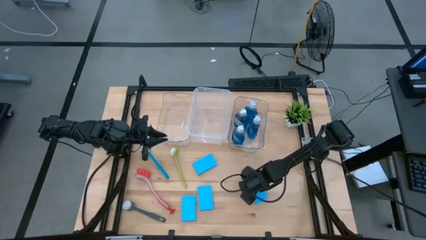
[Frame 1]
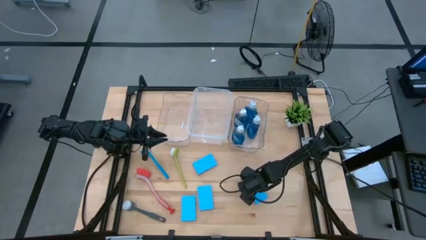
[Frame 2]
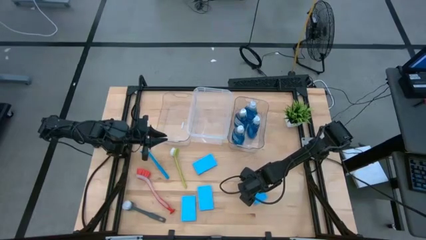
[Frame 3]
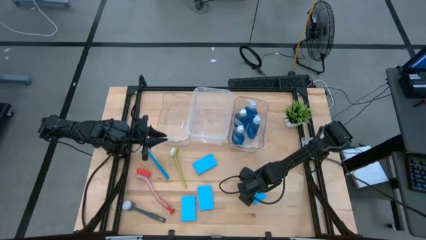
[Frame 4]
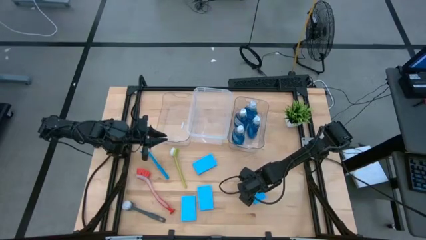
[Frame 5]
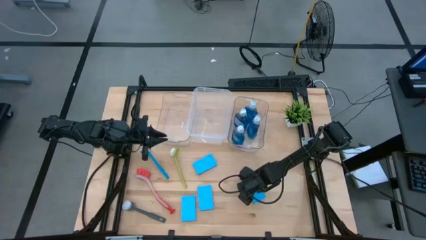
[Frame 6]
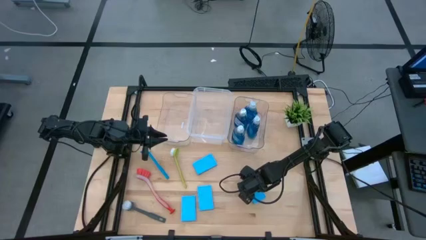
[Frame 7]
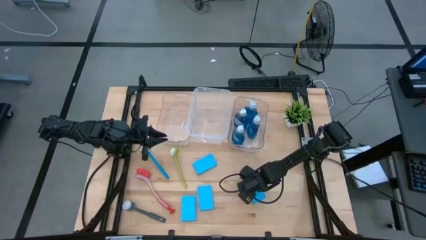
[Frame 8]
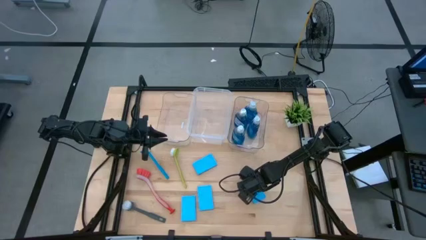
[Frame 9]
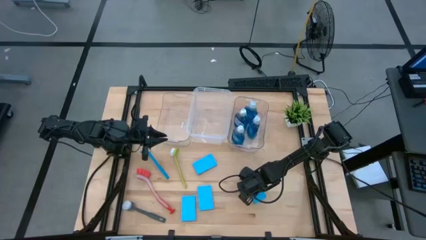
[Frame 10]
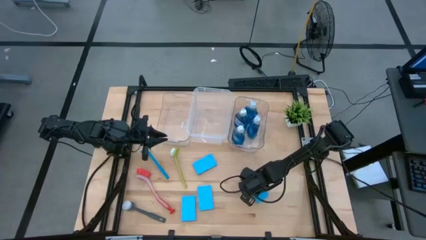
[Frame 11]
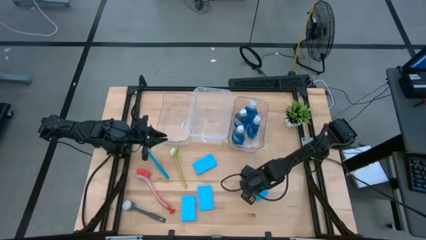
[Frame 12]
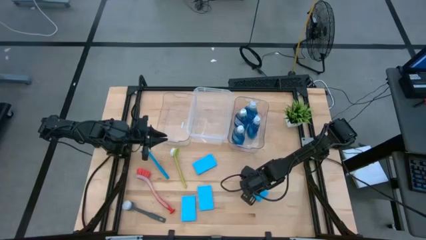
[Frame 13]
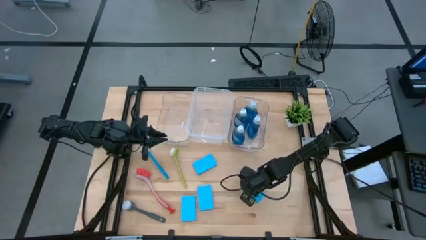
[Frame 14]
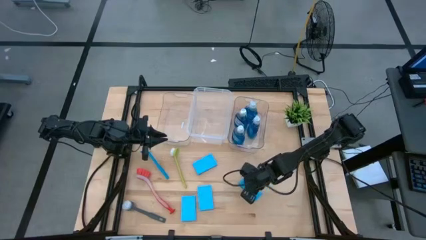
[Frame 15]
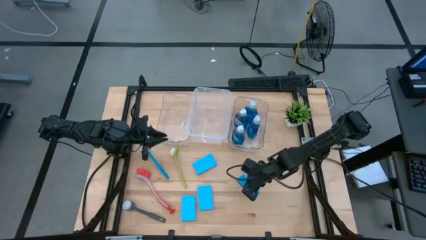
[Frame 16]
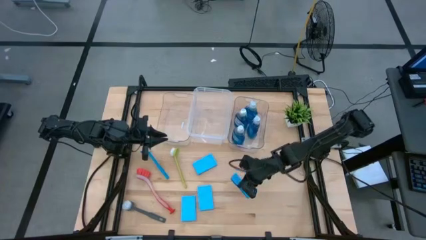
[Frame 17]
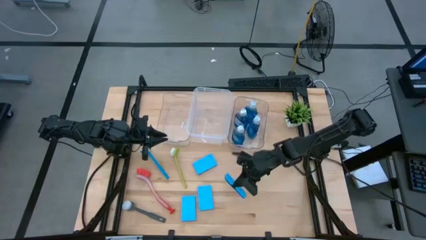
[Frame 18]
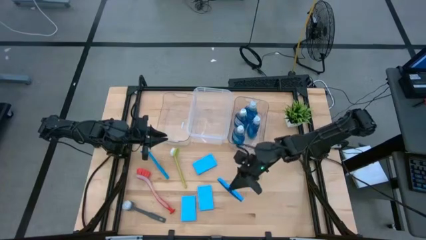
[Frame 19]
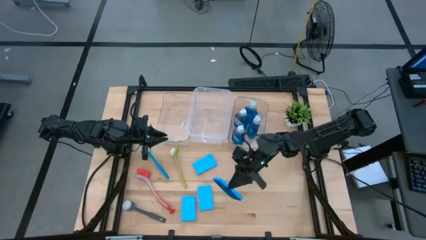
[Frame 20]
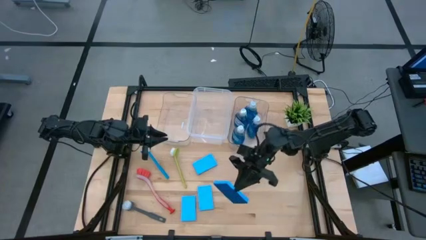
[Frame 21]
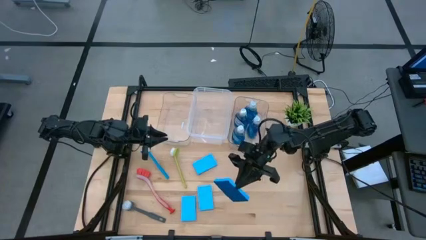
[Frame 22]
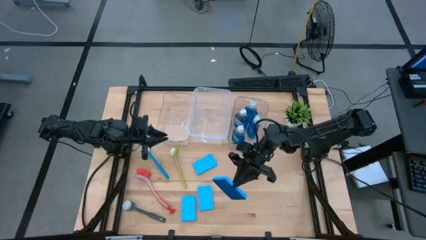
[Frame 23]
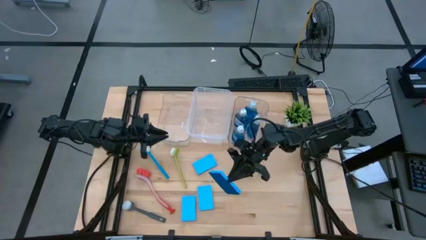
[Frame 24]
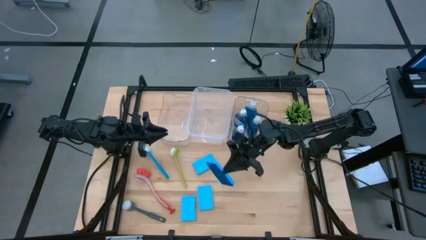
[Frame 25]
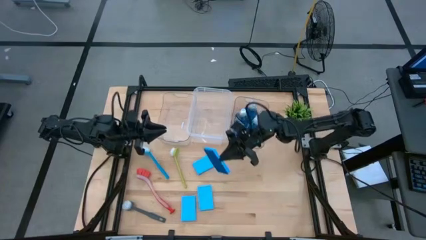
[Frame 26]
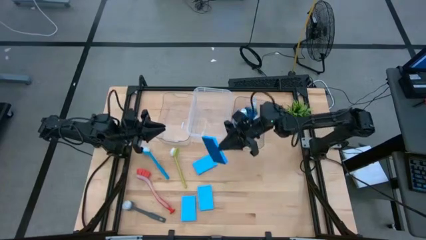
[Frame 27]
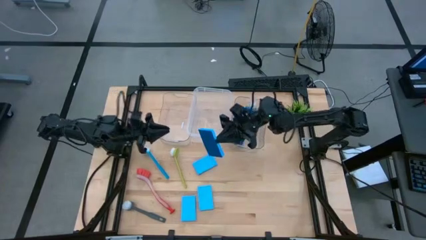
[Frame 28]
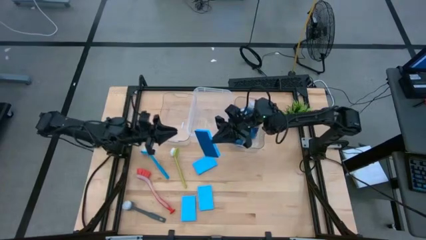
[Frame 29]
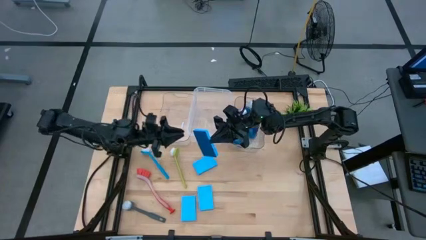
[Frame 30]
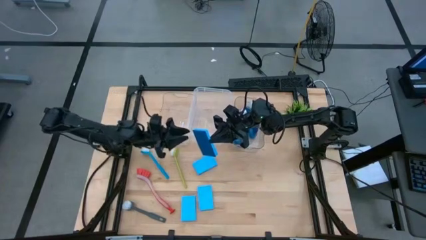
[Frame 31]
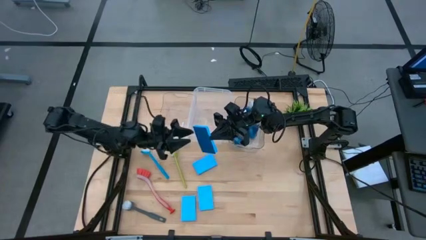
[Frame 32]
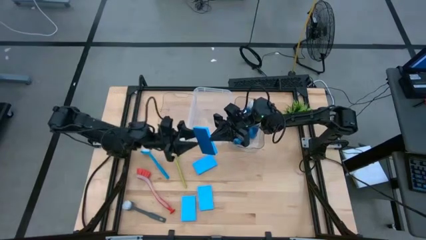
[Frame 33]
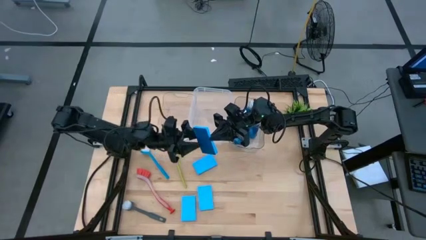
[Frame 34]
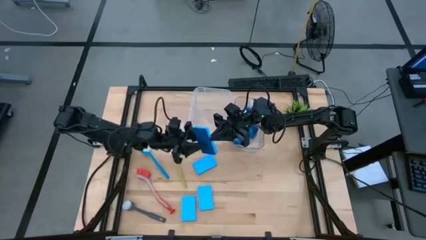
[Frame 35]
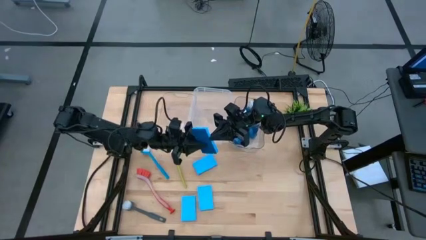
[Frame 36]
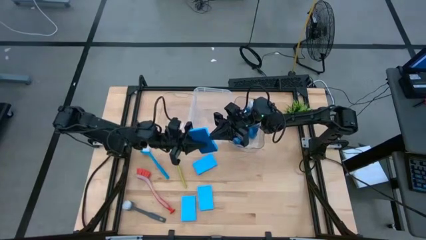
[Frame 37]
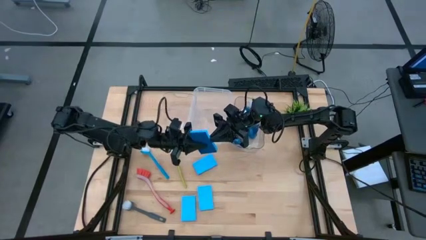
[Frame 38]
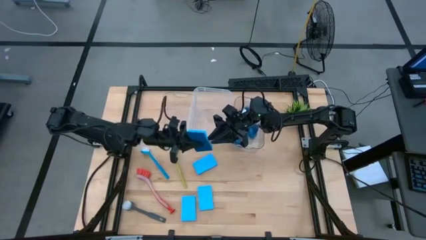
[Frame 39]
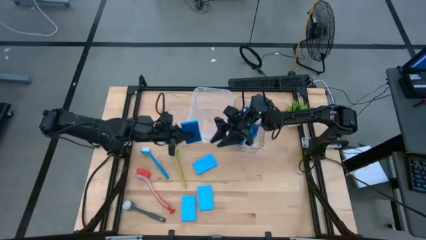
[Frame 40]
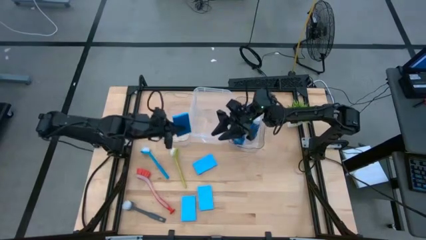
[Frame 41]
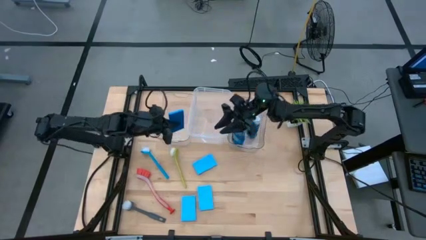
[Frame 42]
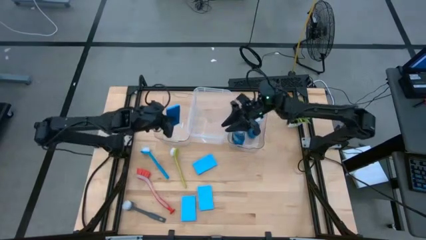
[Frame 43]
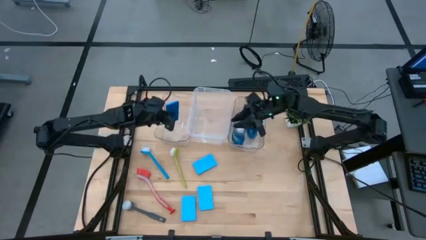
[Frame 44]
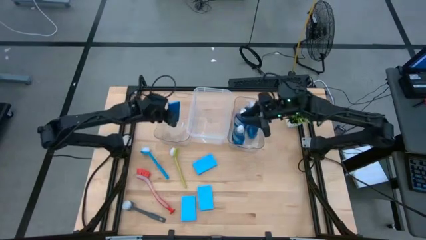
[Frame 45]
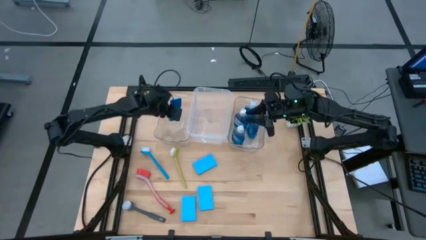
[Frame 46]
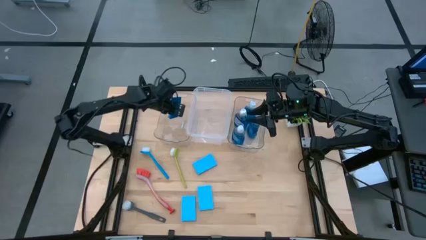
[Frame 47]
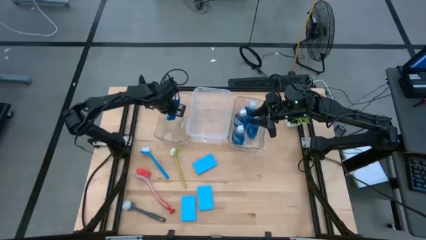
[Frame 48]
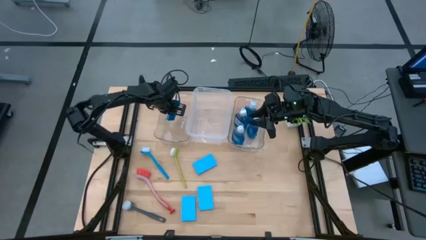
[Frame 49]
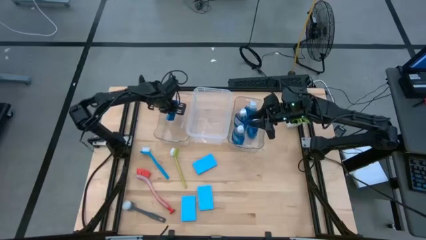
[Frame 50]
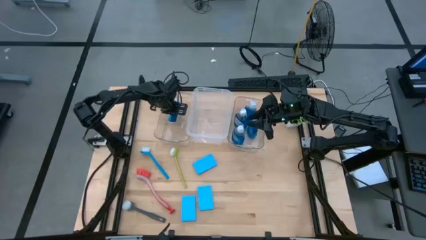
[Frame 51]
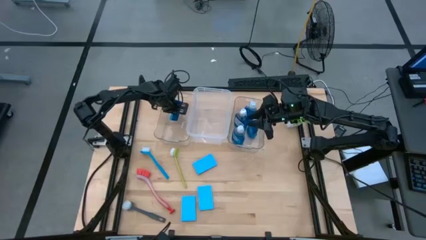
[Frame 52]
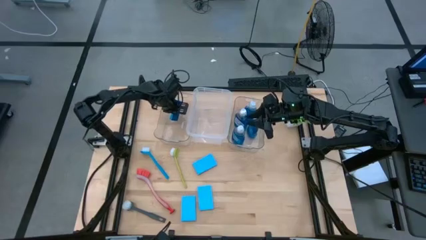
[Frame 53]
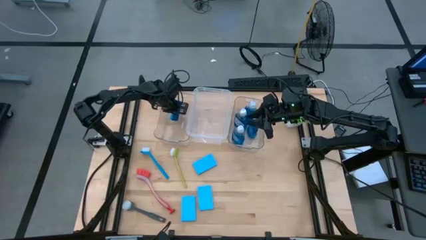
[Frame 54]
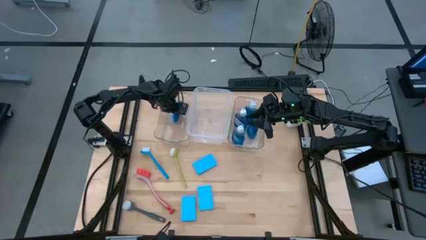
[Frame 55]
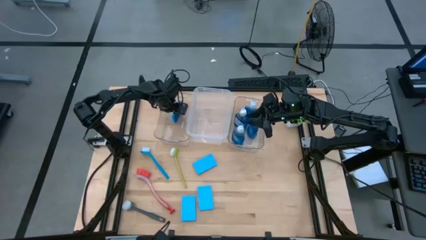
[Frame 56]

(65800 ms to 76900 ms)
Task: Pick & Place Kitchen Sink Supplies
Put the blue sponge into the left transparent bin

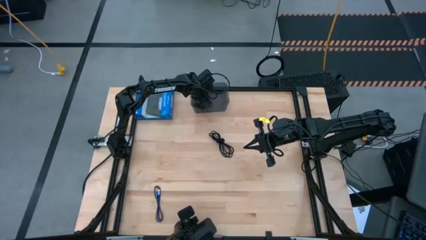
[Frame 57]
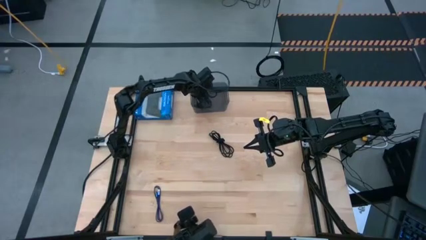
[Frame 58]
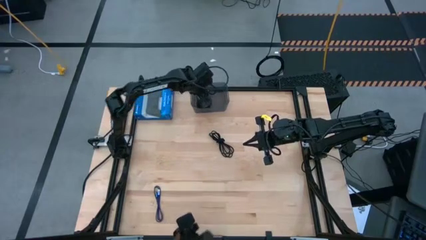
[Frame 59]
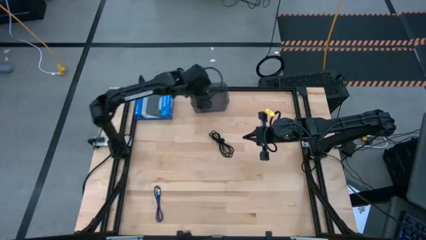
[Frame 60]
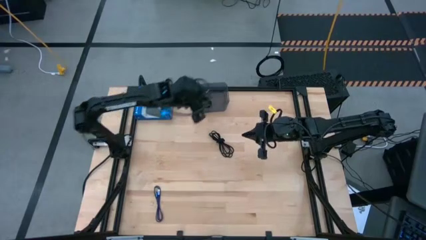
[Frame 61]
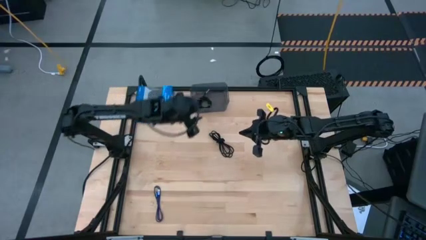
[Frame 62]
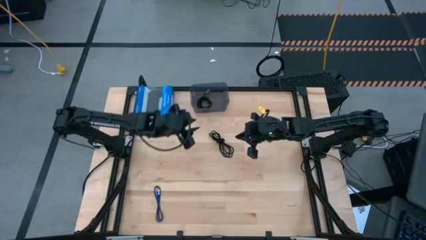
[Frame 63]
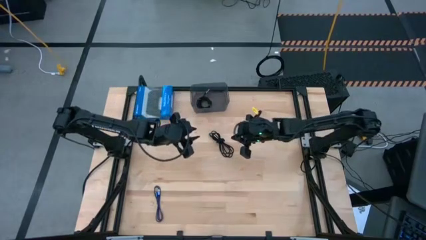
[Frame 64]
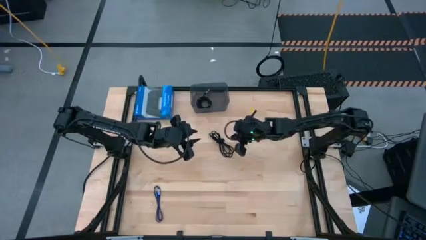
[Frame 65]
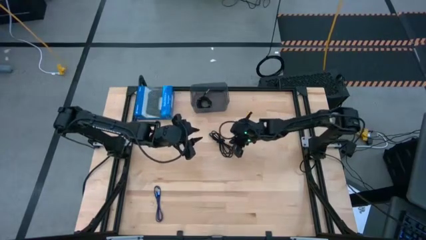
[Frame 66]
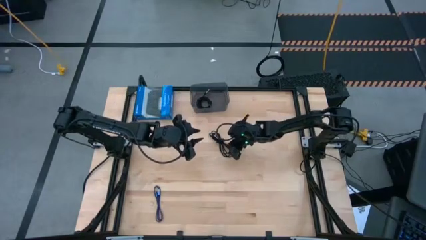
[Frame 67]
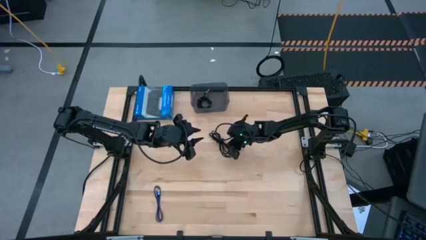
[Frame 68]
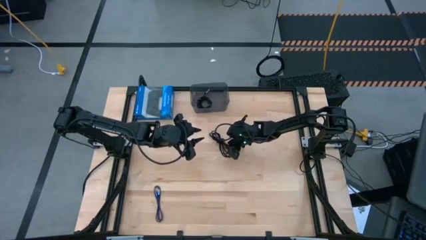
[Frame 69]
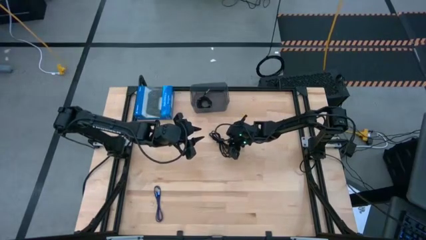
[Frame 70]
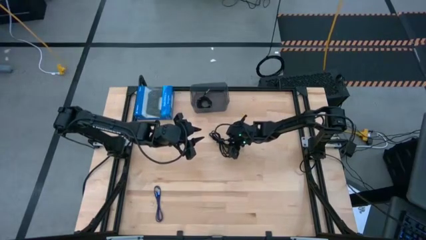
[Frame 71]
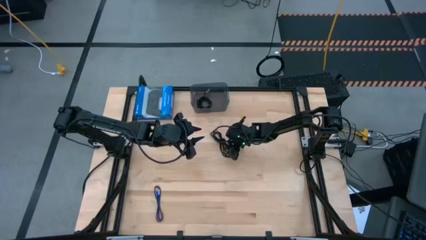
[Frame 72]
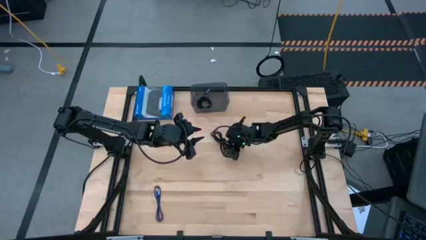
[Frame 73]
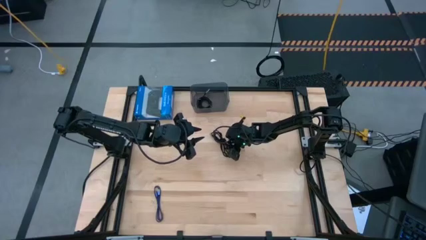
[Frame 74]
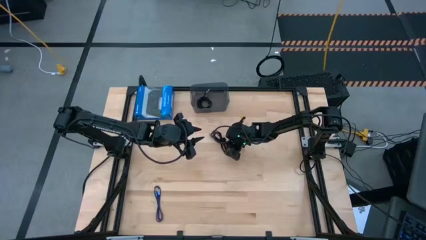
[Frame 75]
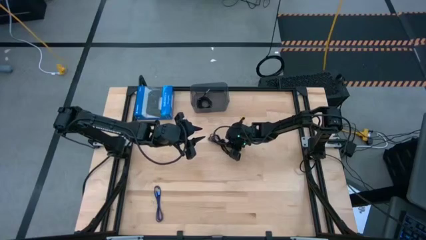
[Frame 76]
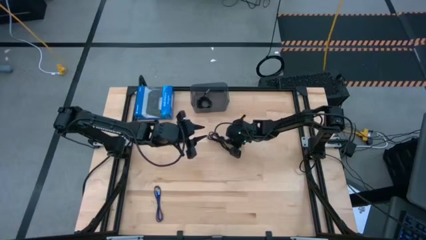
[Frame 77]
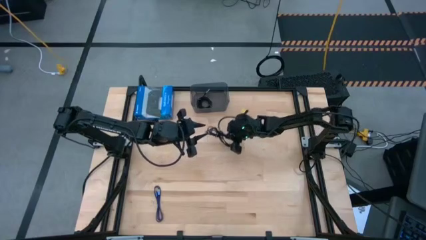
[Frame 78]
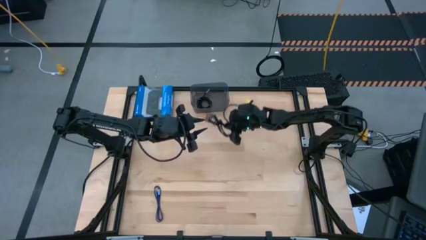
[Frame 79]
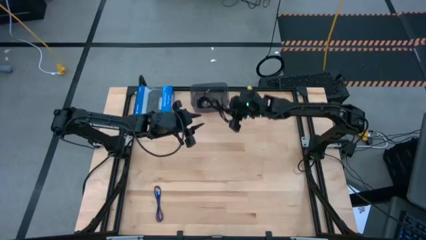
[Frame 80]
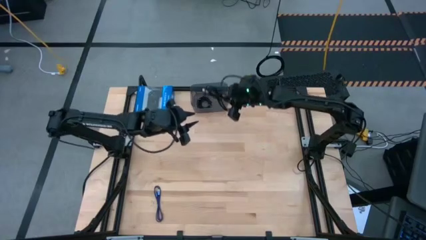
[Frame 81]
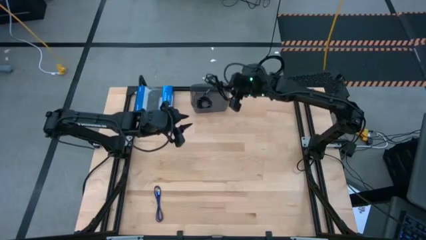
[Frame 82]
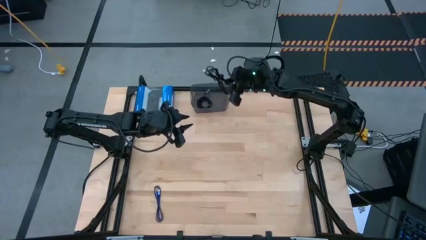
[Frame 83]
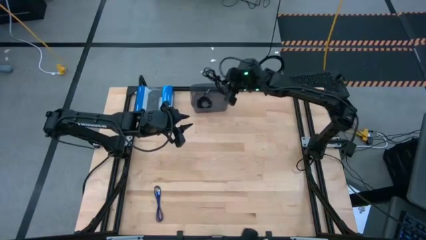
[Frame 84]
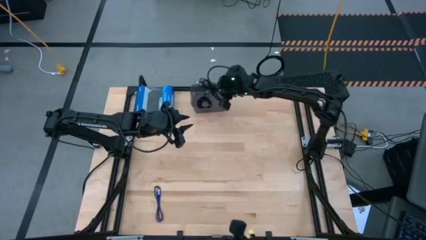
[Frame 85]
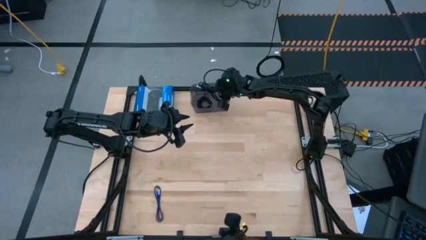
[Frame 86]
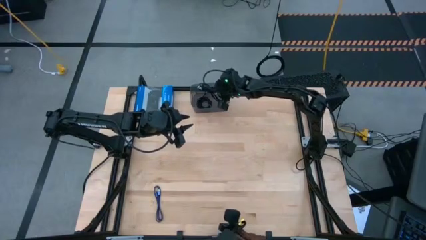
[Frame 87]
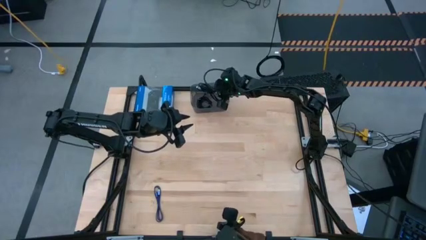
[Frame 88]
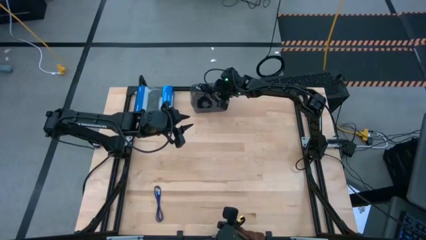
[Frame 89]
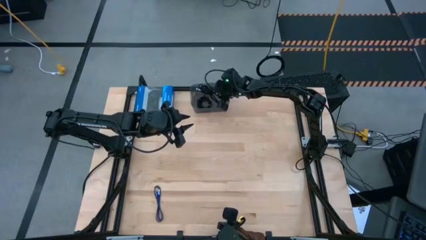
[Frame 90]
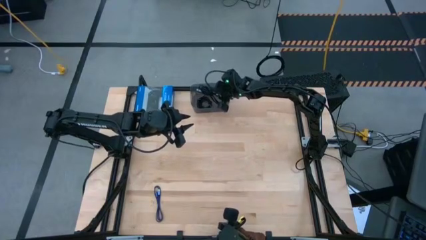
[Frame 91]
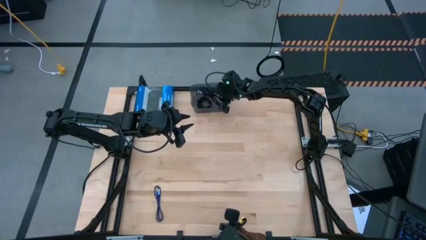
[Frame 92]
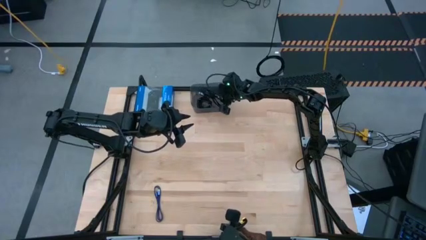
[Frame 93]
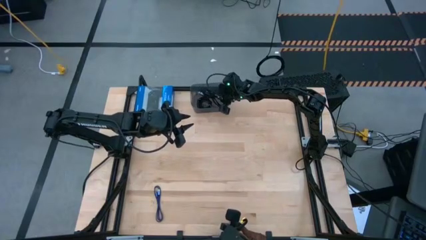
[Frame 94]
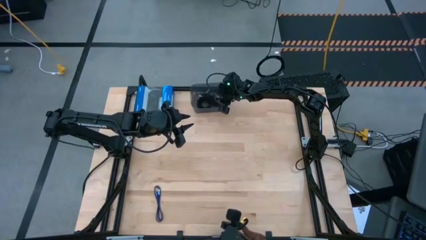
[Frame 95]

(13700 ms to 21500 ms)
Task: Pick and place USB-C Cables
Put the black charger cable into the black bin
